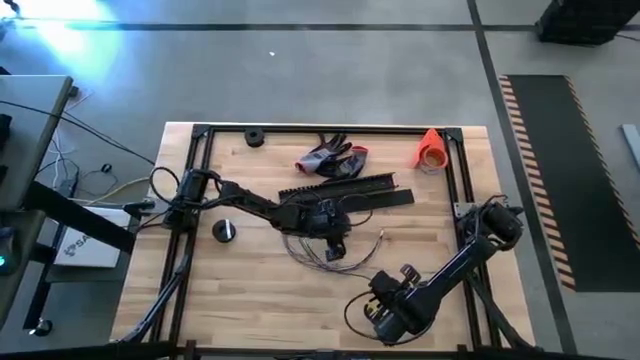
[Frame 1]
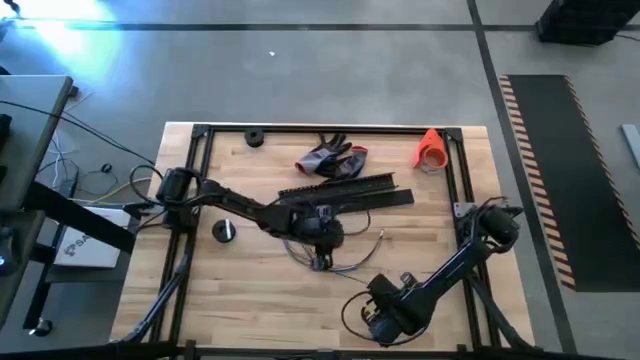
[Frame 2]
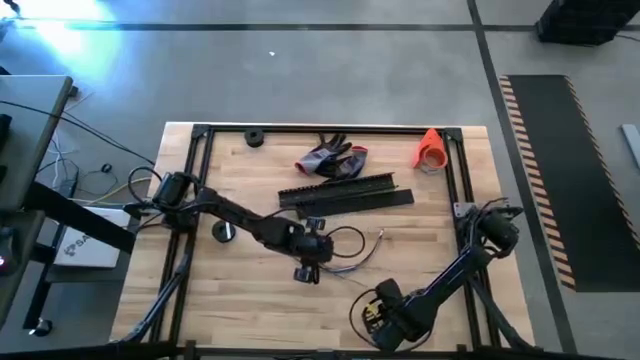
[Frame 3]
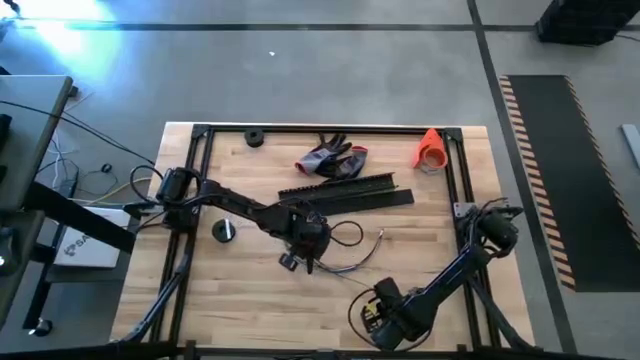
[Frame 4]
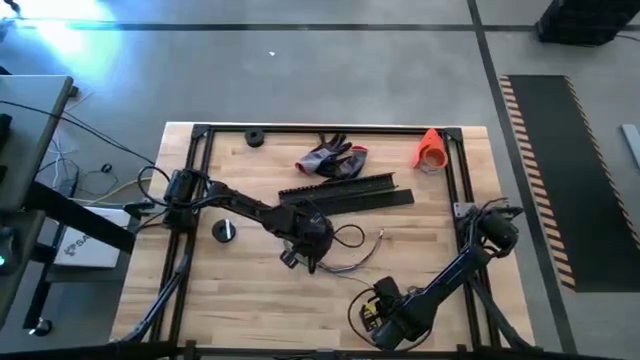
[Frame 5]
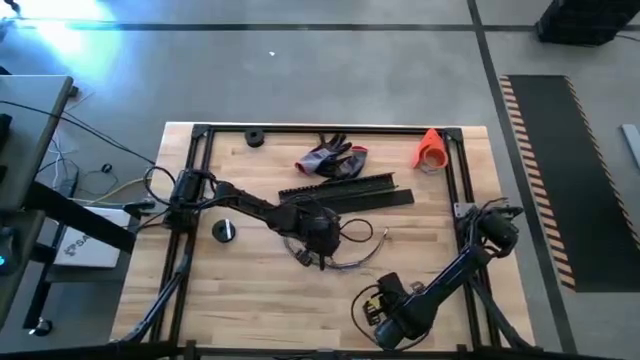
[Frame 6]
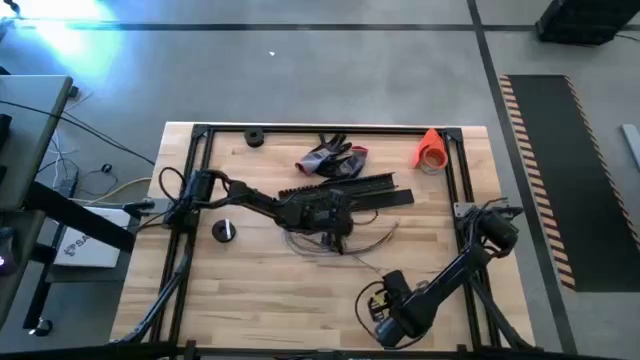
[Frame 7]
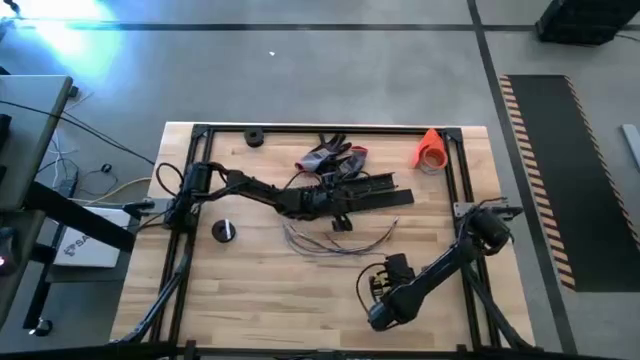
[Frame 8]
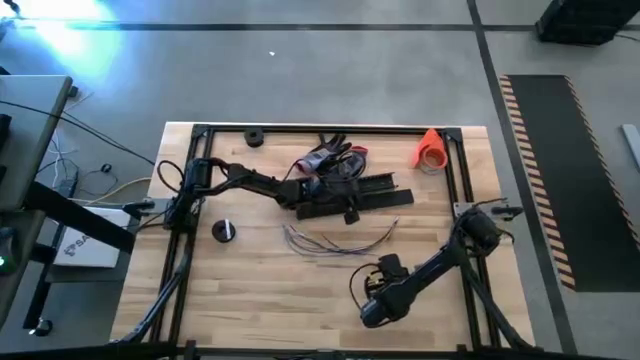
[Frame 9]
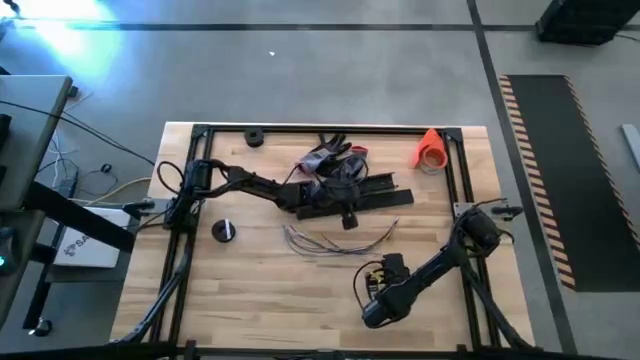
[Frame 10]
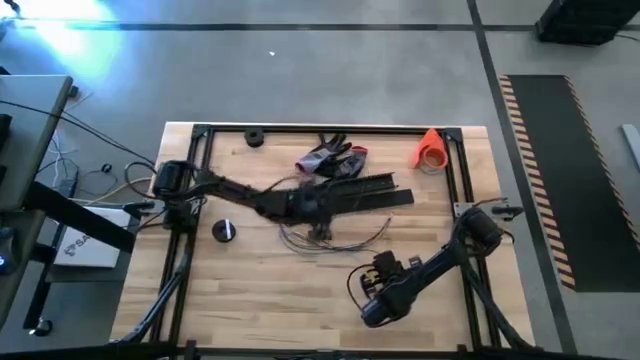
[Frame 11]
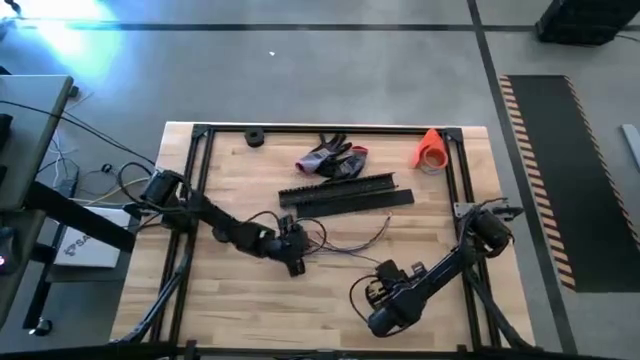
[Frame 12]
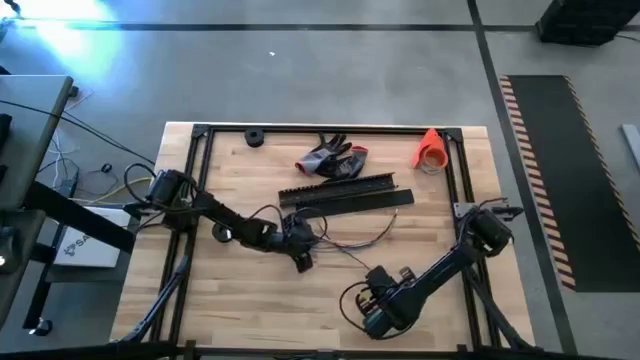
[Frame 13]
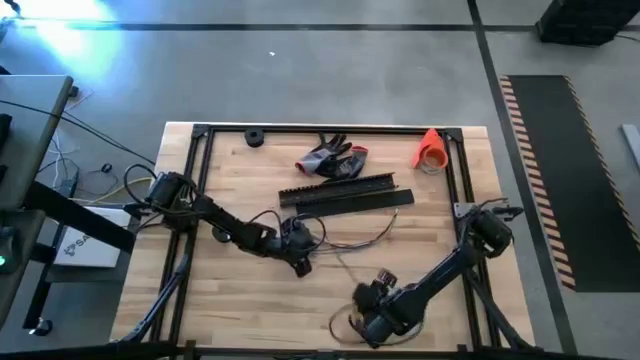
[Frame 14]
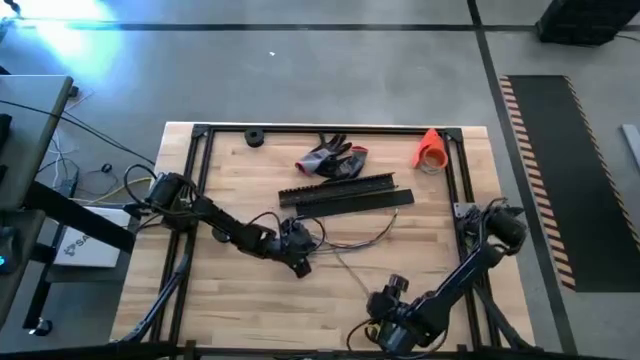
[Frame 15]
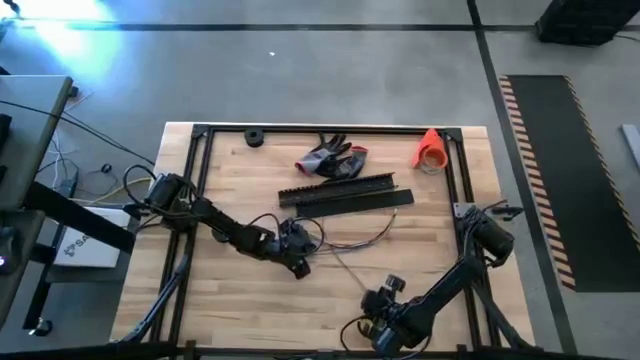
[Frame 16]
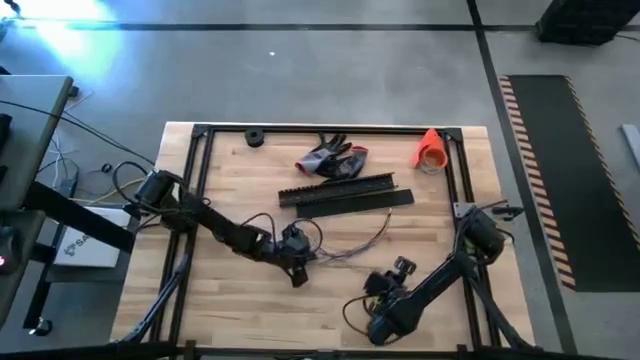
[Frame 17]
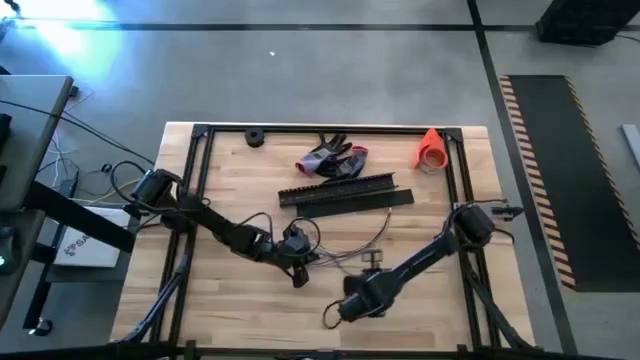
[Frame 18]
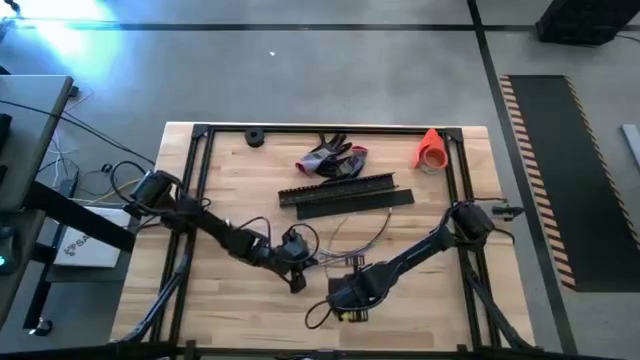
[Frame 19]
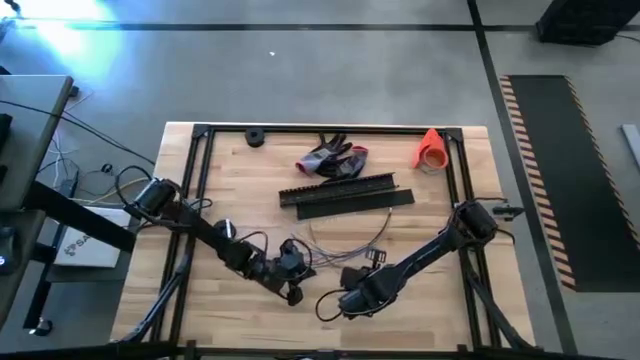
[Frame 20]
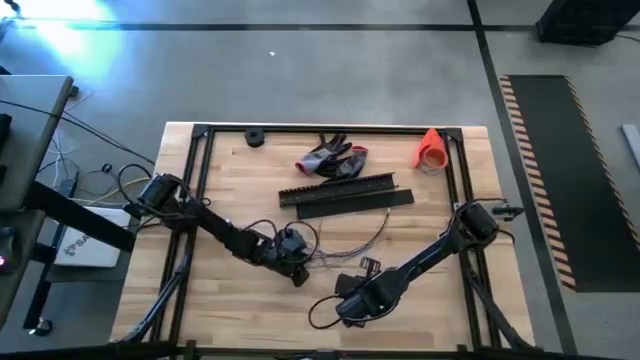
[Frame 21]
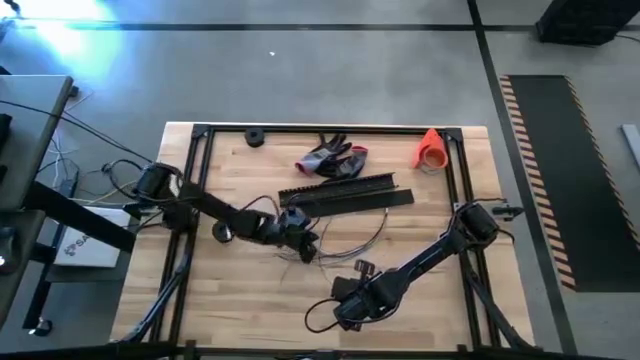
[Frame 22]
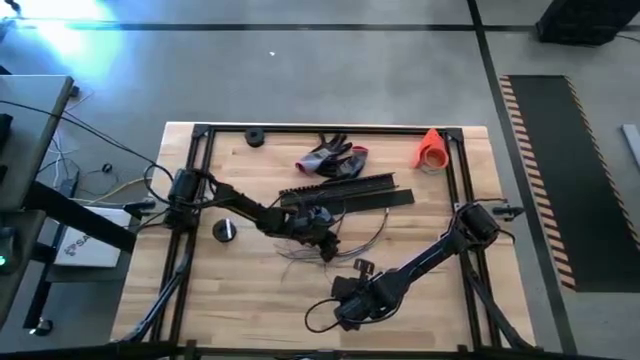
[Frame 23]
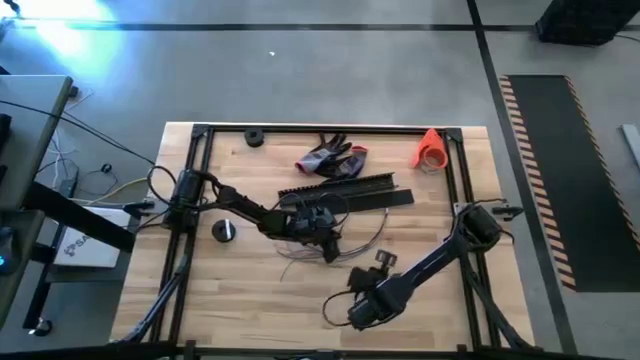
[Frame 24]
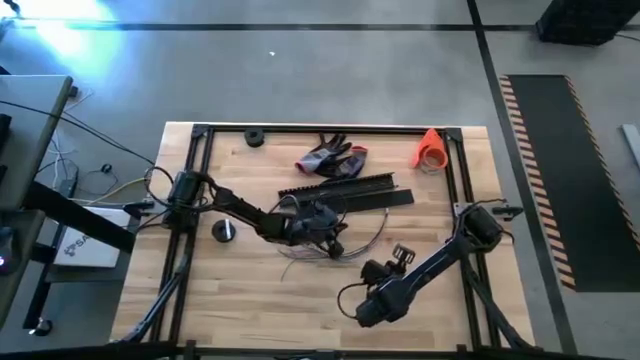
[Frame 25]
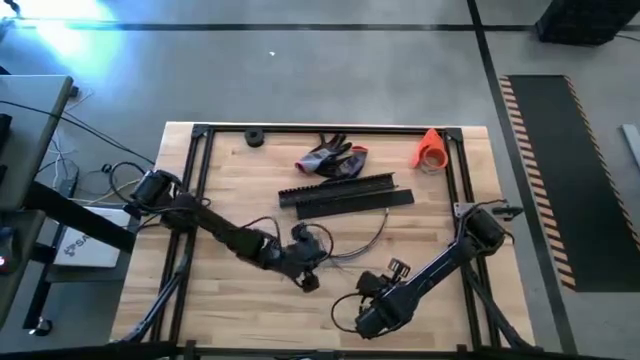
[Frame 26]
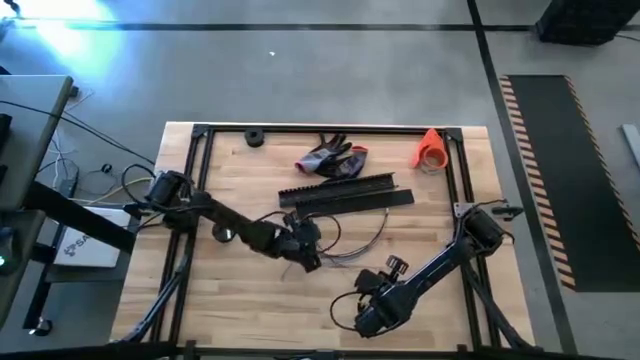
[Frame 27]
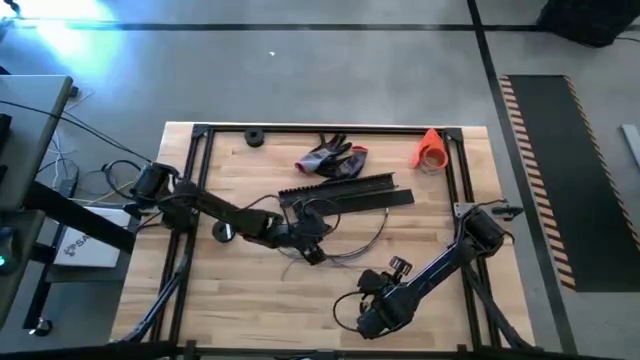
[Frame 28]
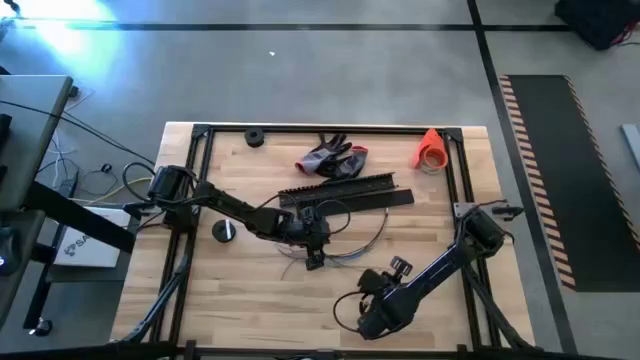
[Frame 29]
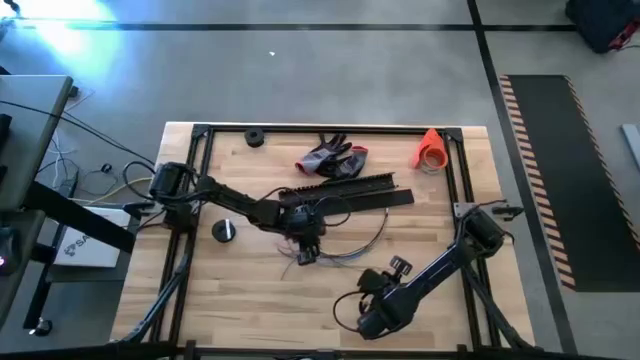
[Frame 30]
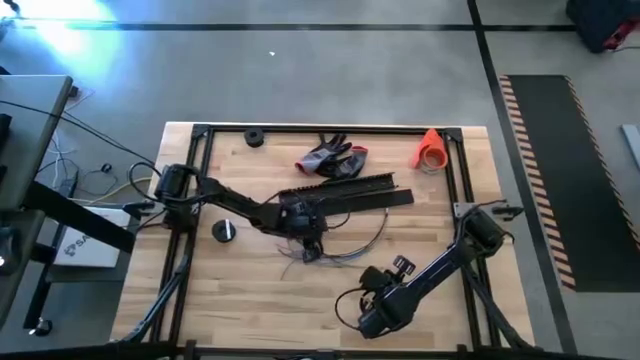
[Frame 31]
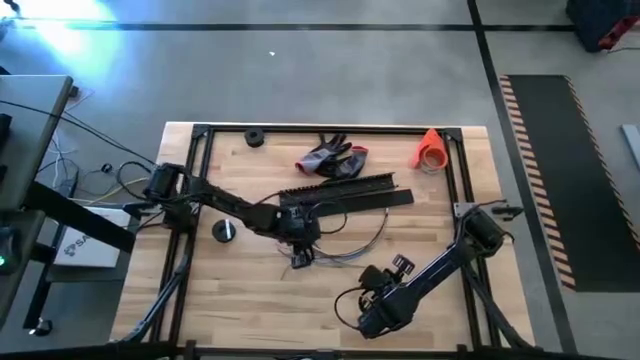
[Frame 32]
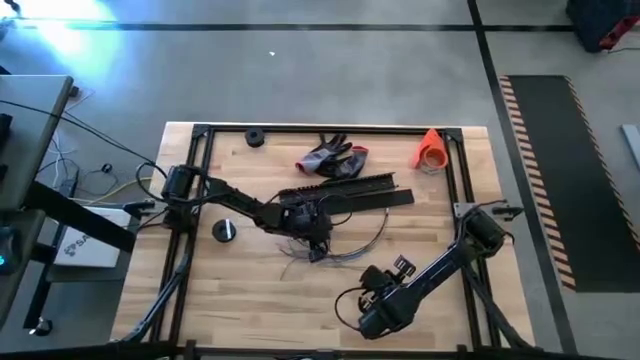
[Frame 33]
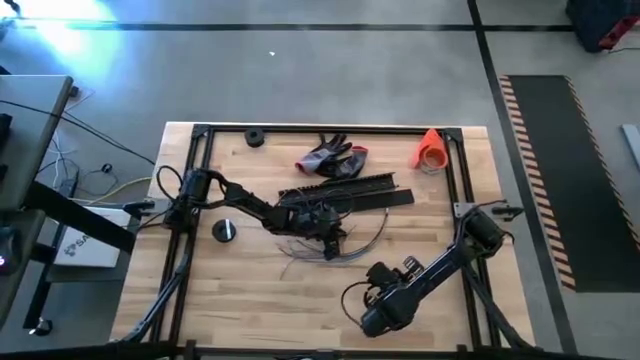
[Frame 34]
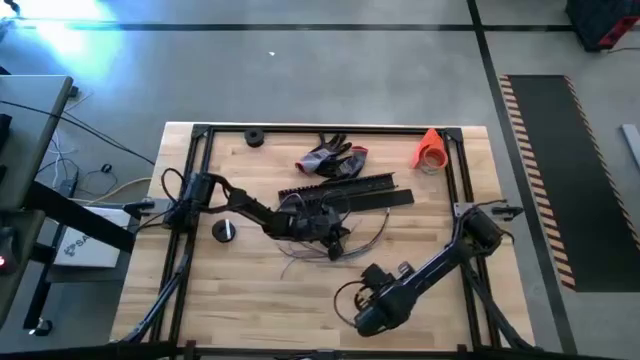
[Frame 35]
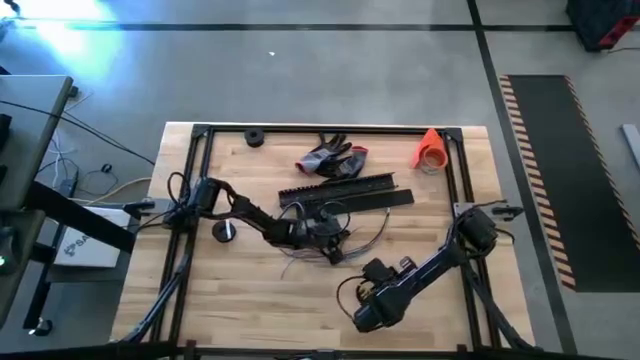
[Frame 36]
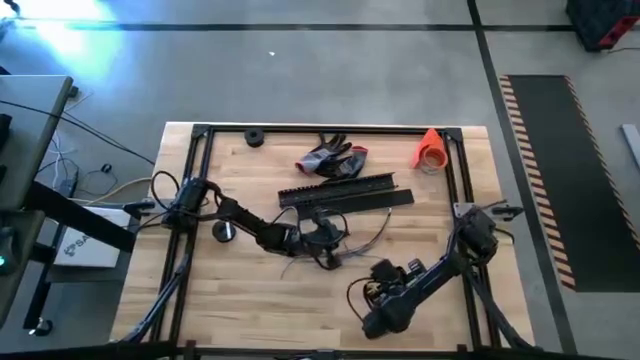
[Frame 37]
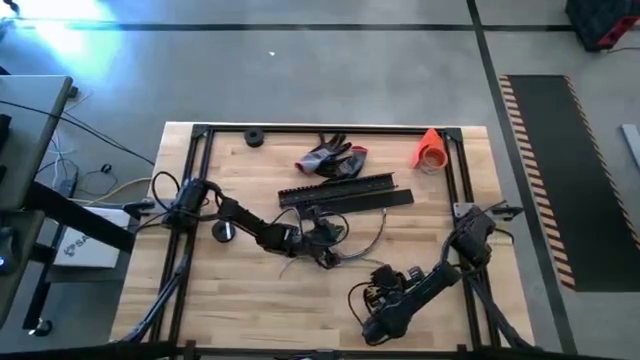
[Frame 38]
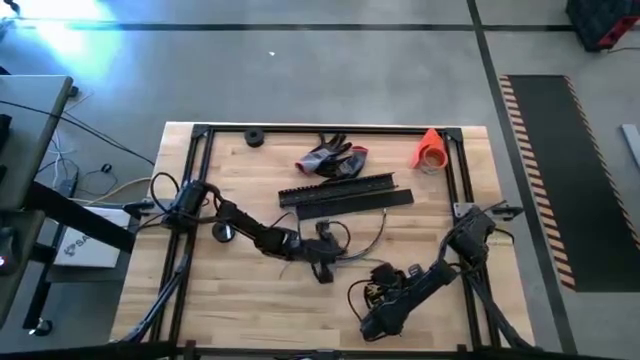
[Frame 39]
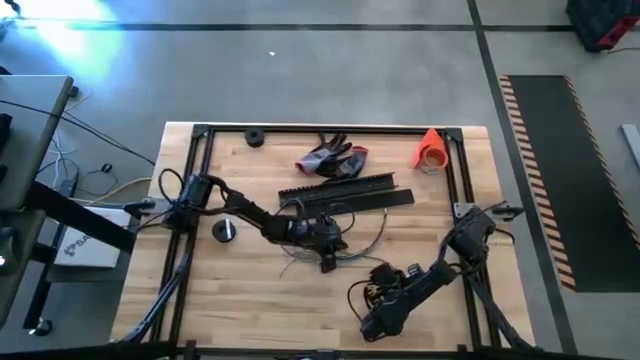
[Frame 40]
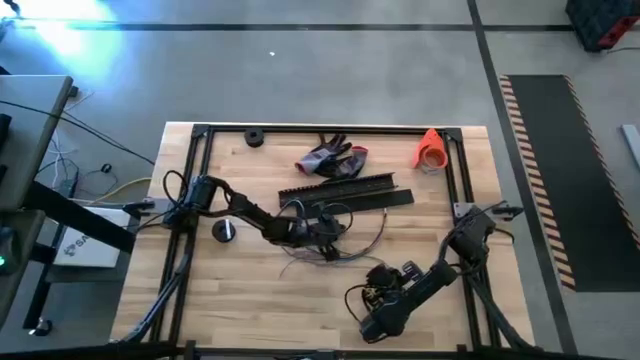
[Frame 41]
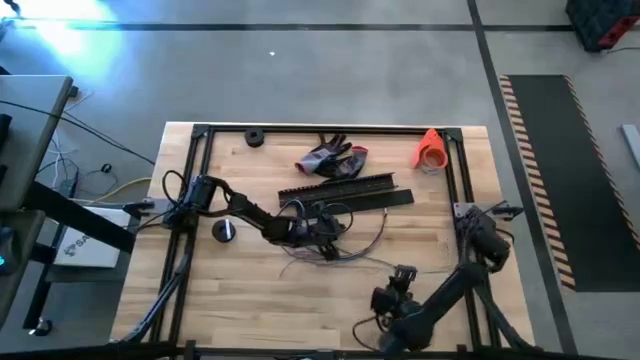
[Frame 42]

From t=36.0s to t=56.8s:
Task: Ziptie cables
Wrap the cables using a black zip tie
